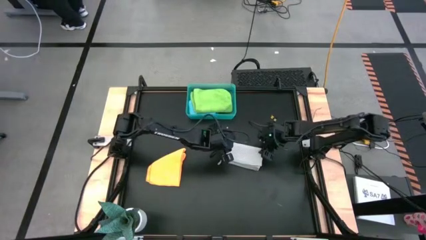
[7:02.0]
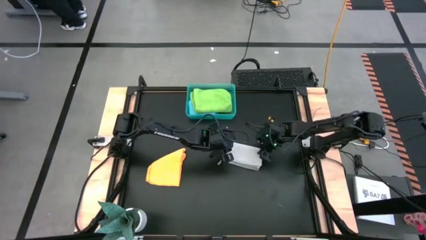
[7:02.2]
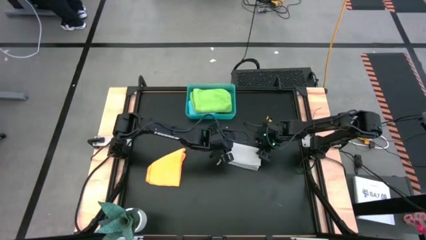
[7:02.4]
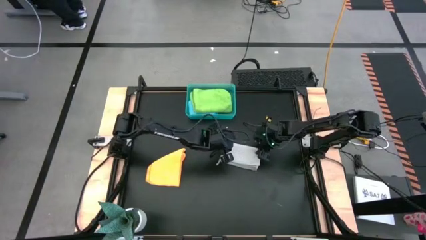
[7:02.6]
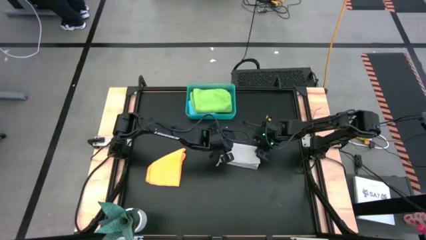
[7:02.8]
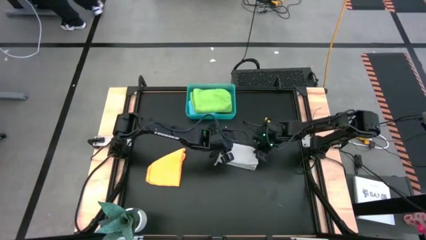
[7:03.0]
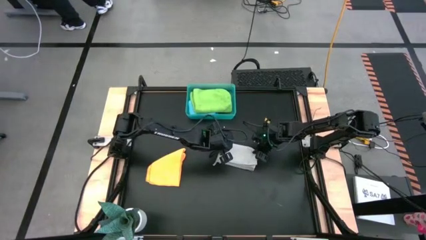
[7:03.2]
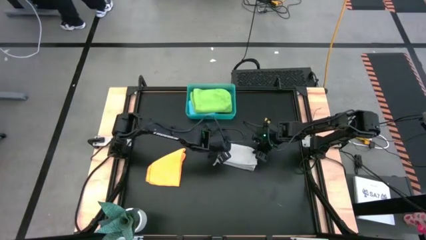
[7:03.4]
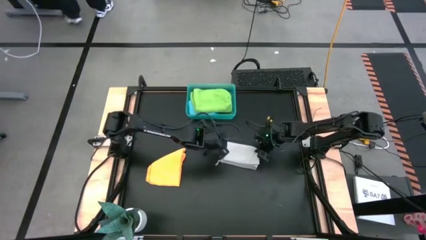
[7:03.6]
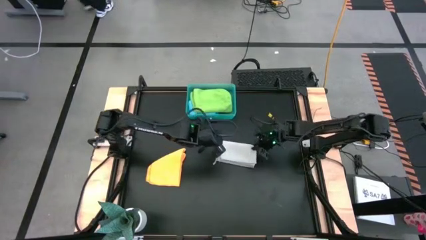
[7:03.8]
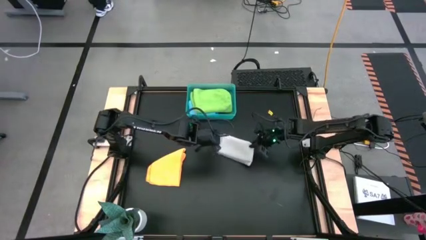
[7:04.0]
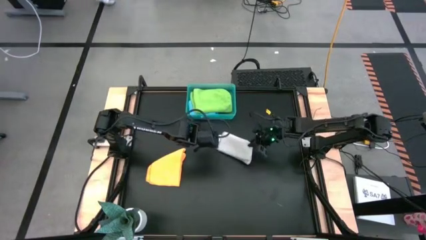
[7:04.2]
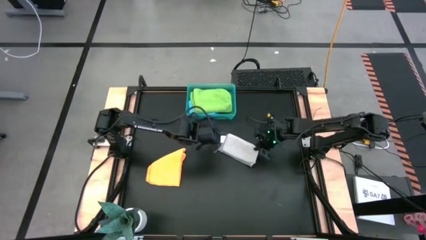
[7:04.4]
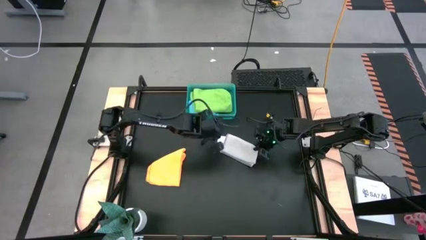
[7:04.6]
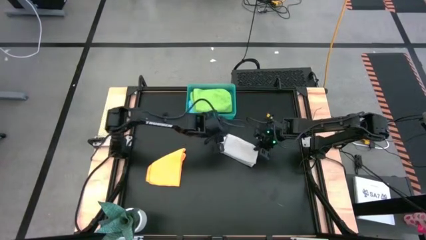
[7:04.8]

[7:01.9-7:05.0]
Task: Fold microfiber towels
Stack the folded gray towel on top of the green microfiber towel into the bin

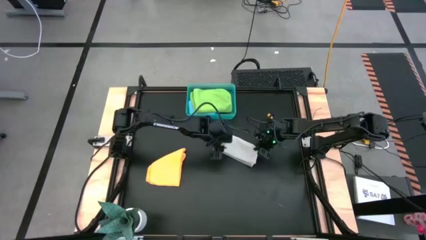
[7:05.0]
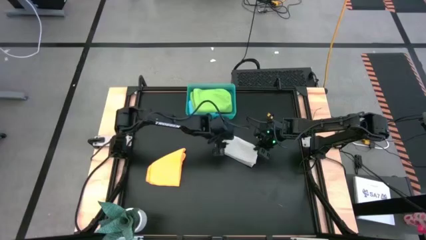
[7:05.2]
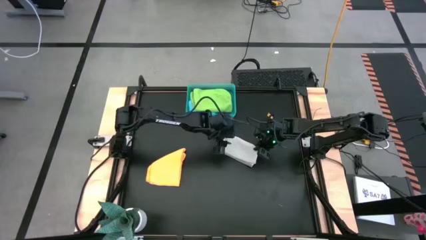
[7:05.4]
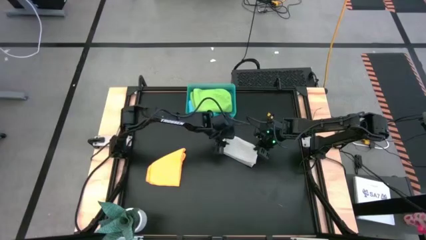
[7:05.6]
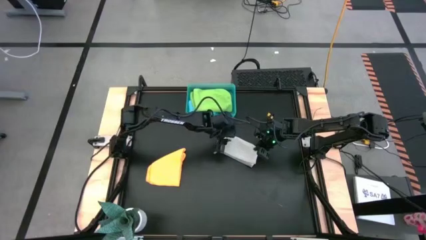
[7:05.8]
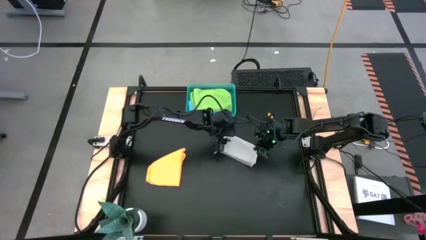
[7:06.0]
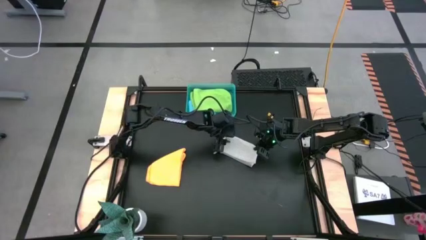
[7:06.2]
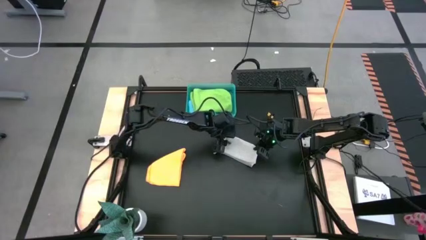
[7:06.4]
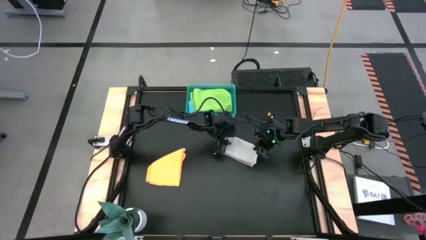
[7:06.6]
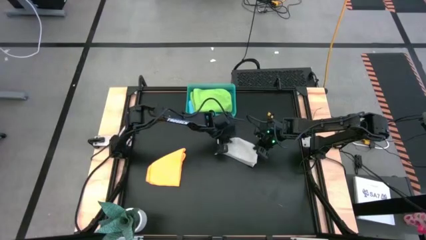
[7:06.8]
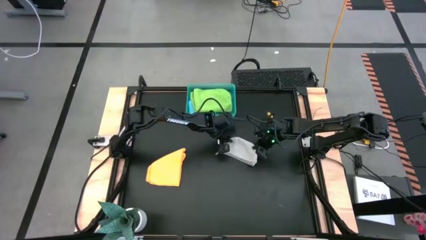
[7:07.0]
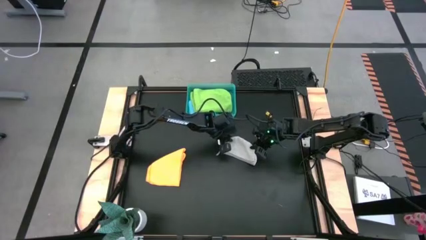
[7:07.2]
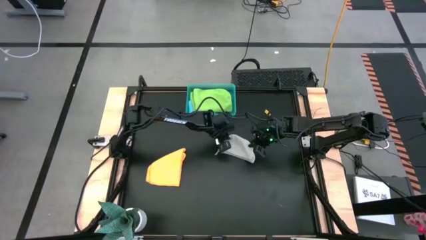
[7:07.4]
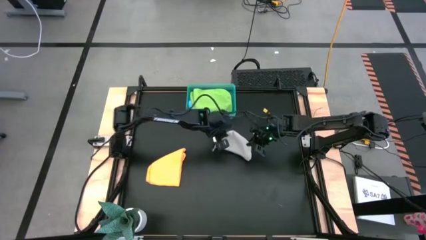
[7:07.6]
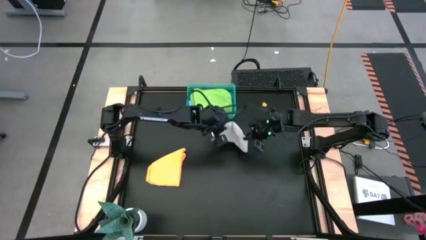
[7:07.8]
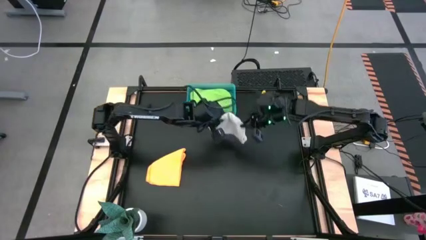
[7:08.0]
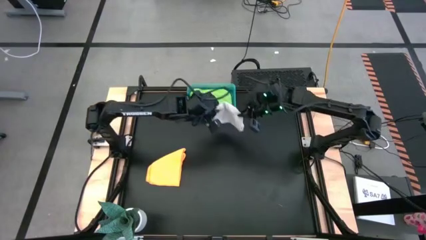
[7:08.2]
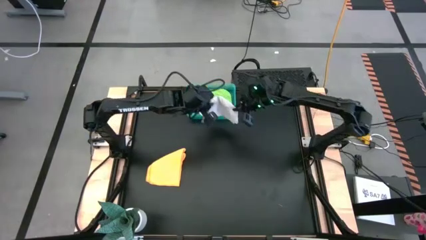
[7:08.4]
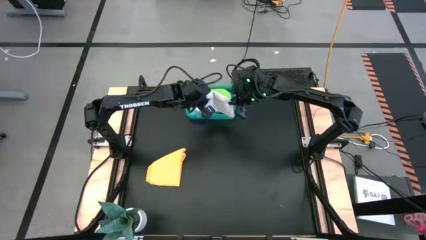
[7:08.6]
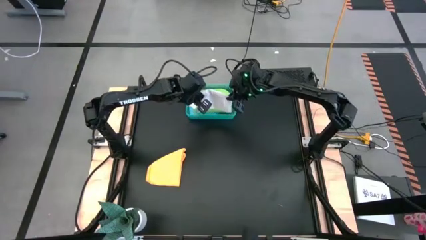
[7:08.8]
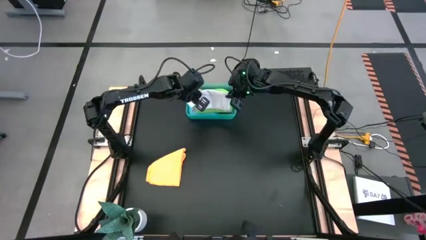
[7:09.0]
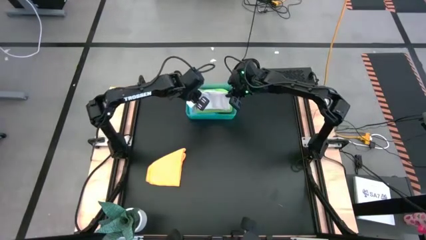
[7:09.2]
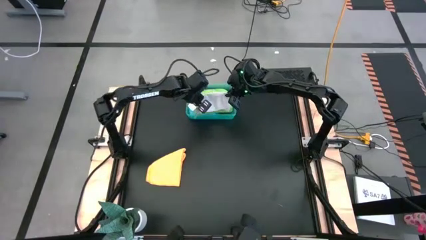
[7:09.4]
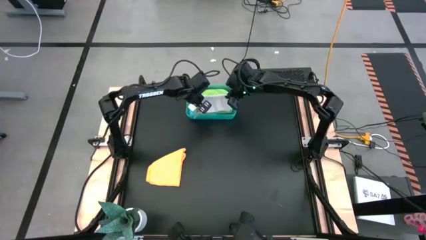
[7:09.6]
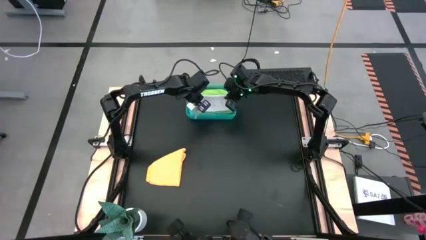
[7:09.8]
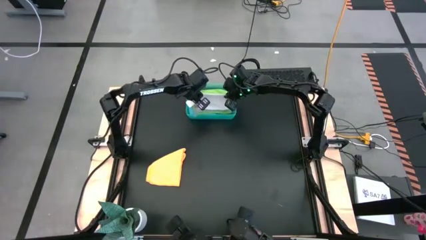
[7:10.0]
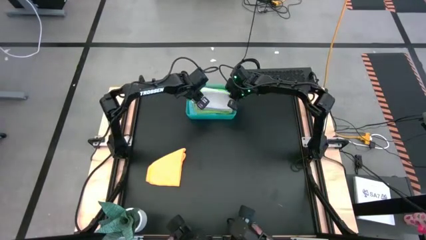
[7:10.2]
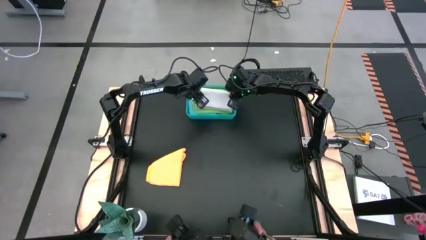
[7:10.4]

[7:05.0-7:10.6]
Stack the folded gray towel on top of the green microfiber towel into the bin

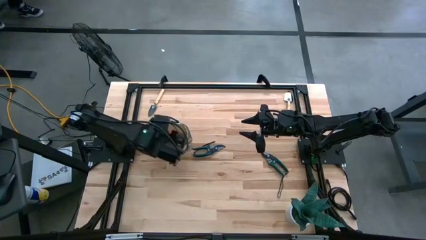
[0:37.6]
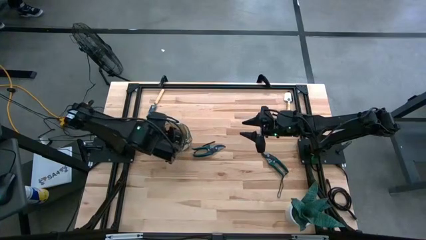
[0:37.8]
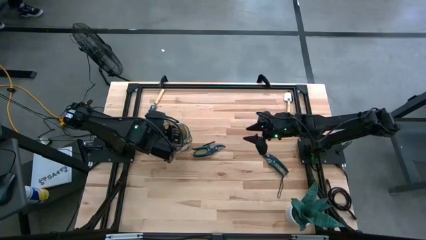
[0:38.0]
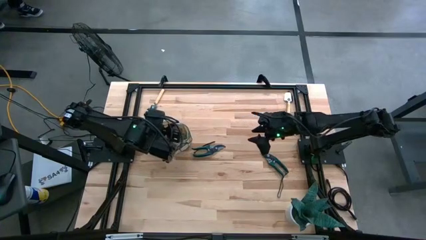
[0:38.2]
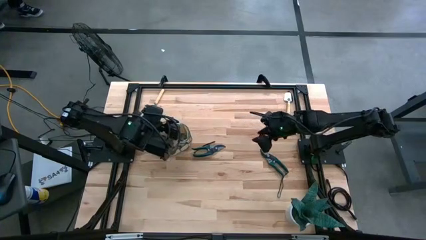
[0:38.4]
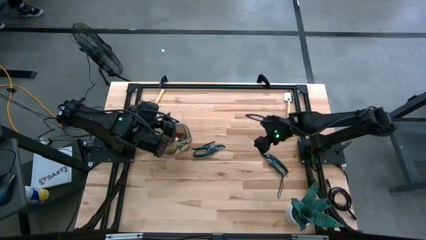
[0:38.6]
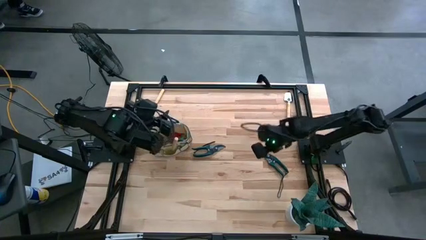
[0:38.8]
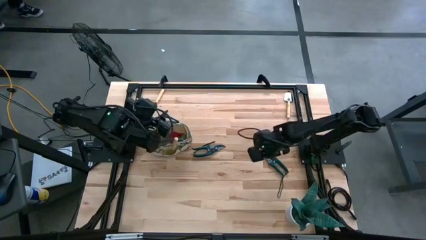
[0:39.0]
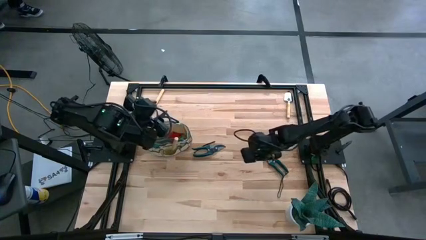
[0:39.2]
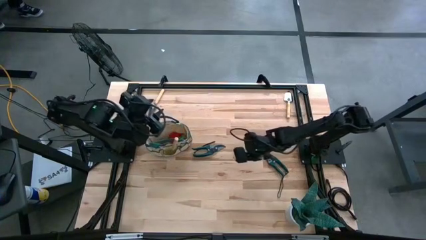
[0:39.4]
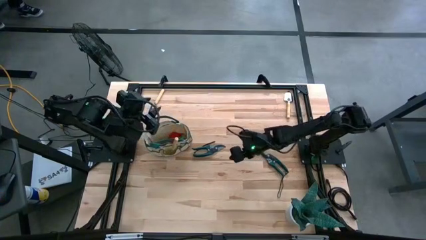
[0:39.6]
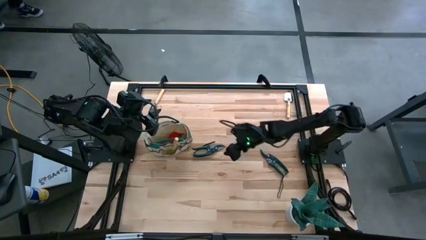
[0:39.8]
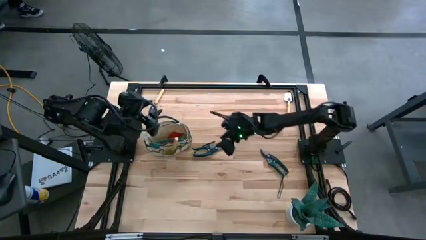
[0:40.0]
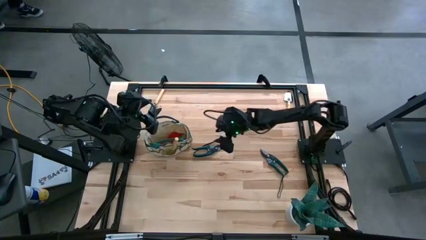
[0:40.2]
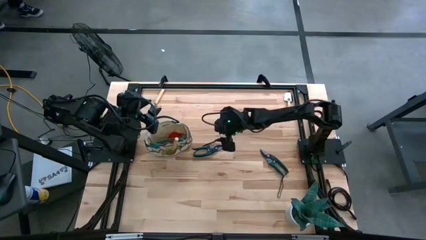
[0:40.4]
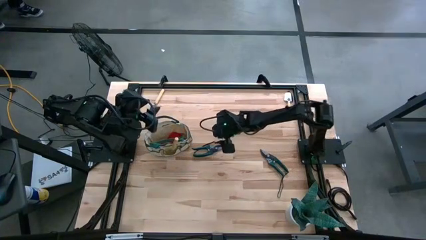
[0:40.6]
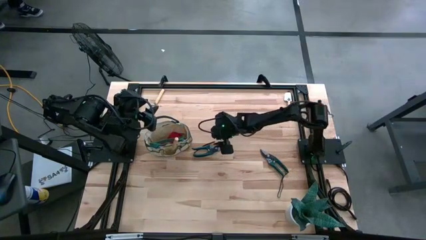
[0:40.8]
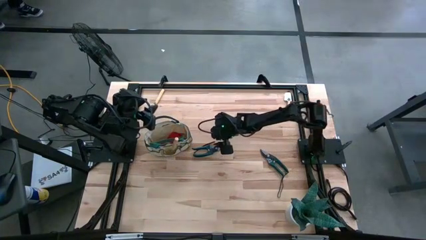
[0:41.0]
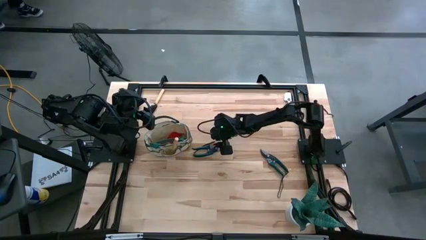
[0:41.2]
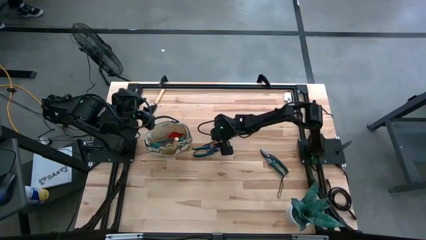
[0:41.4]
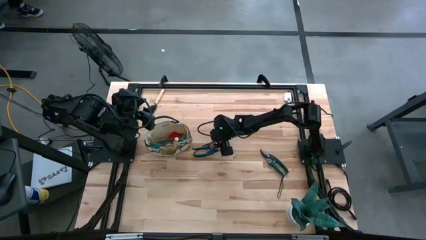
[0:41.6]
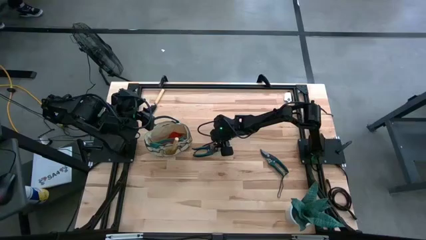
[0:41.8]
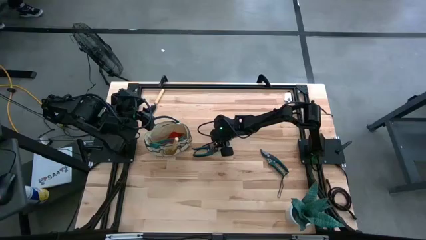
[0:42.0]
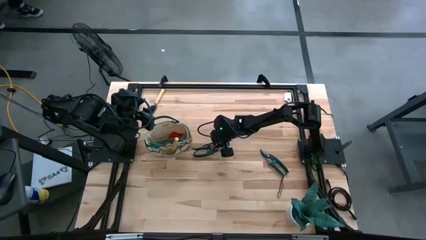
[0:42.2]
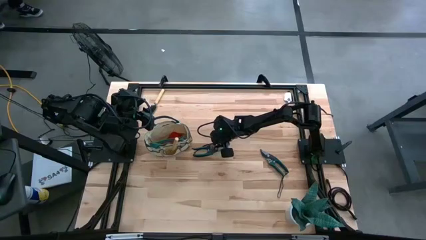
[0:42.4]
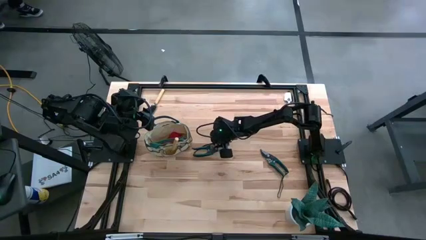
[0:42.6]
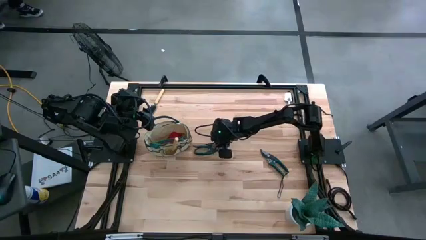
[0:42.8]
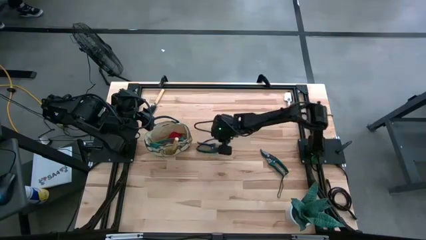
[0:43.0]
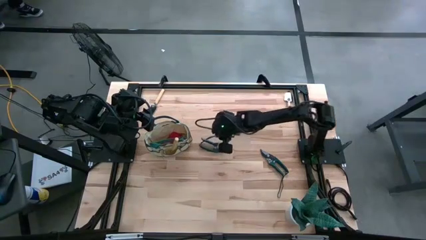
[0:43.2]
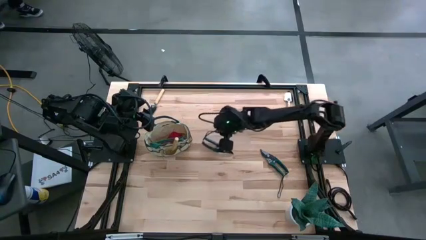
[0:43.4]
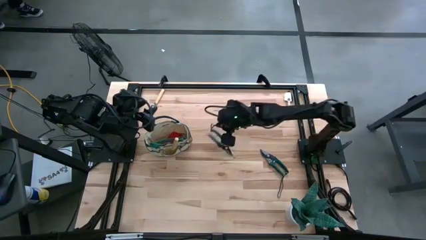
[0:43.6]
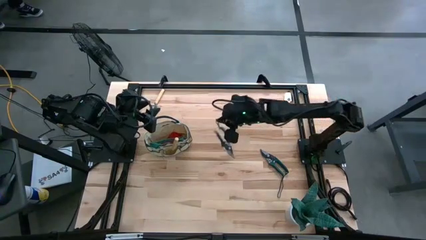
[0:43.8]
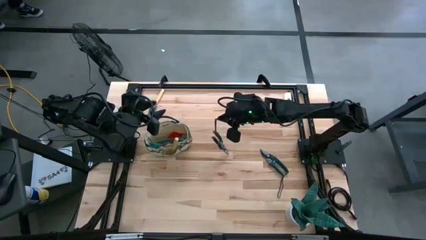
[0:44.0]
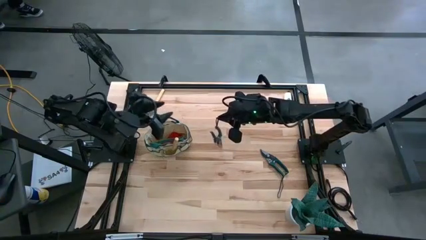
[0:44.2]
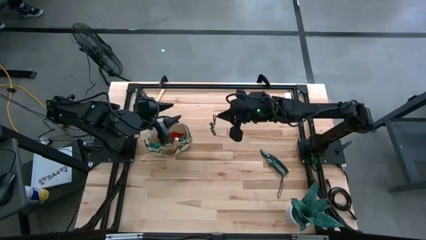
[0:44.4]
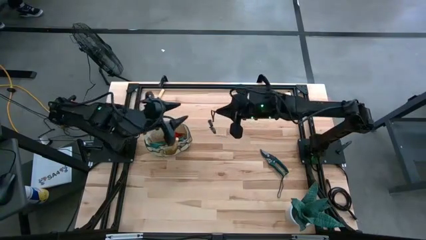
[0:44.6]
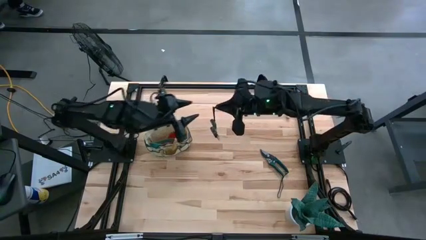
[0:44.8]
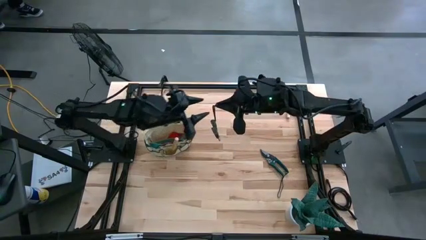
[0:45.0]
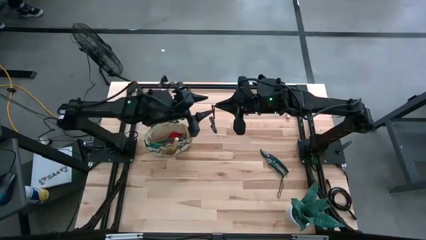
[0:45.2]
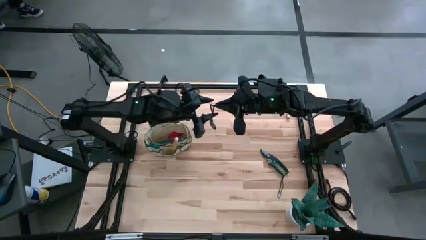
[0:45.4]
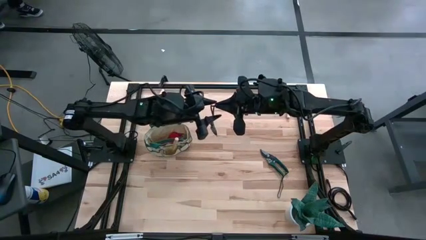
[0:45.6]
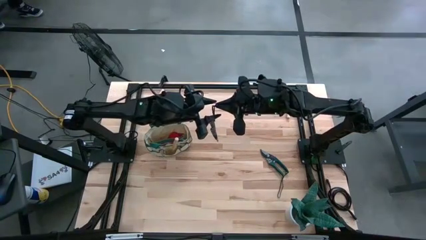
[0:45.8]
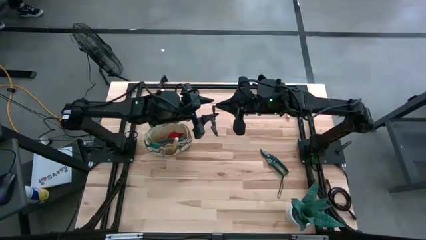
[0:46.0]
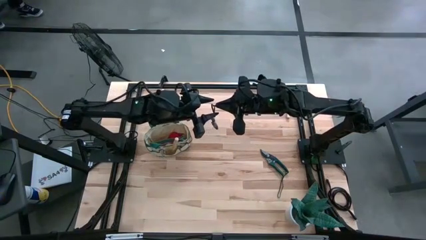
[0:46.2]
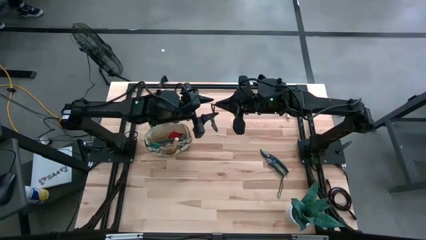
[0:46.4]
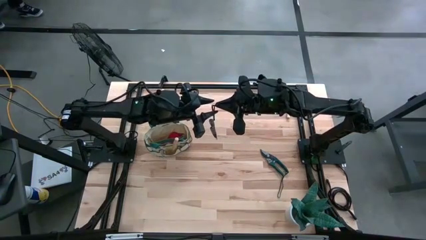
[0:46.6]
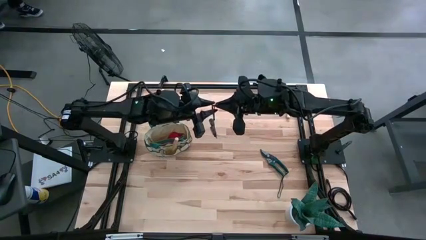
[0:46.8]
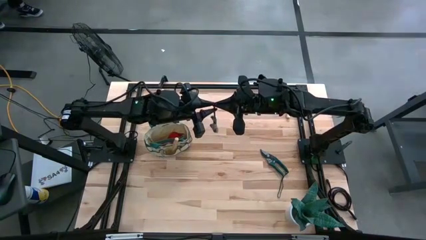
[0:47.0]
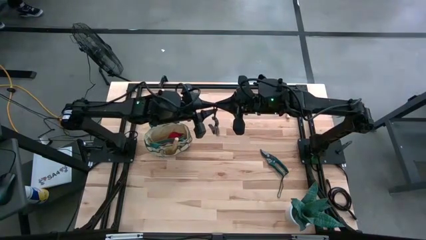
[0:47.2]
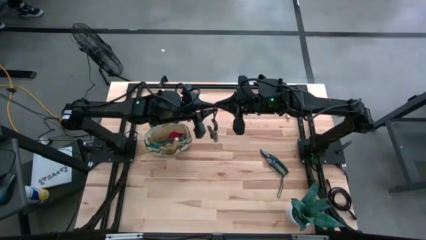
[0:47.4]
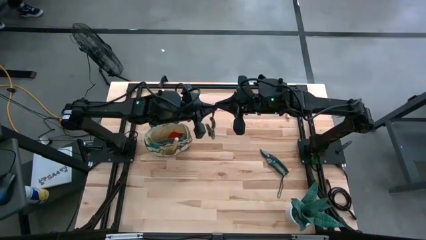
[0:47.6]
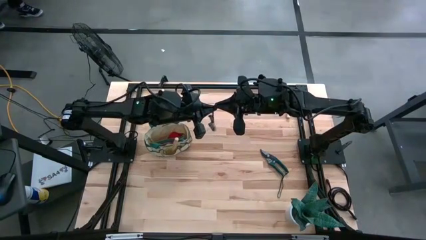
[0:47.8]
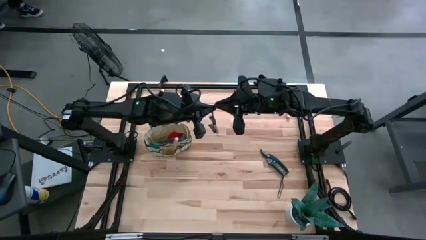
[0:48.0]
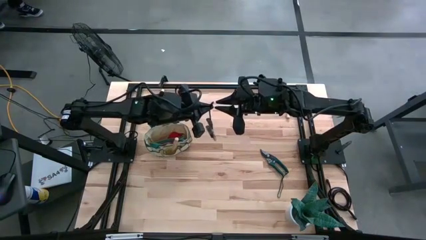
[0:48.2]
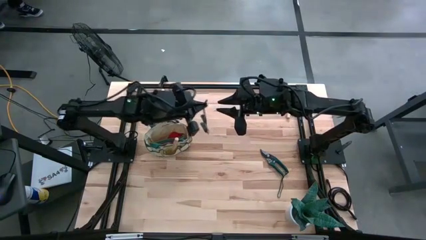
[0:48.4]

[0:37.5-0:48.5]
Task: Pick & Place Garden tools in Gardening bag
Put the left green shear scissors into the white gardening bag
